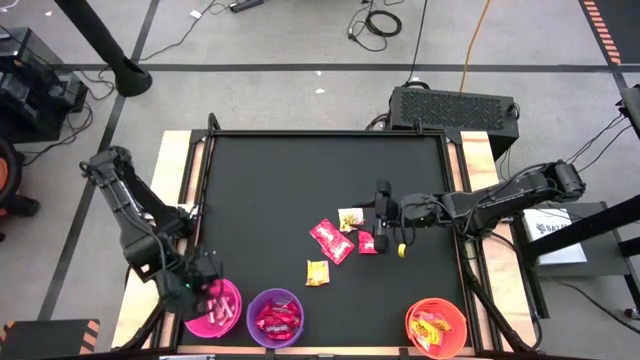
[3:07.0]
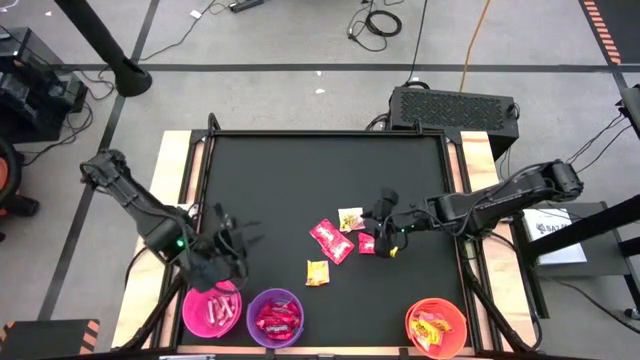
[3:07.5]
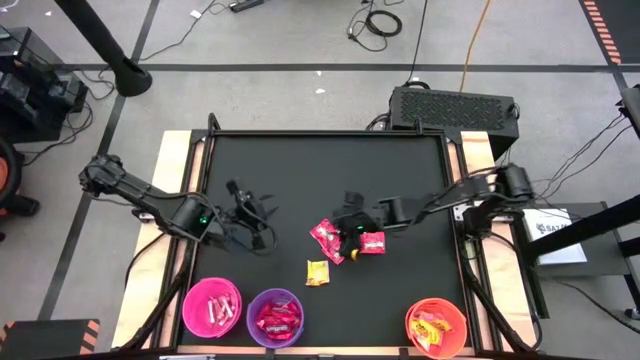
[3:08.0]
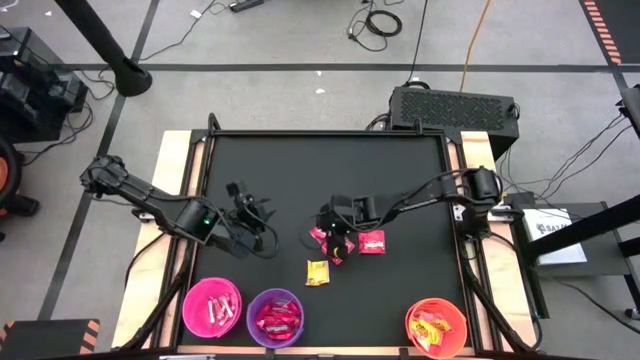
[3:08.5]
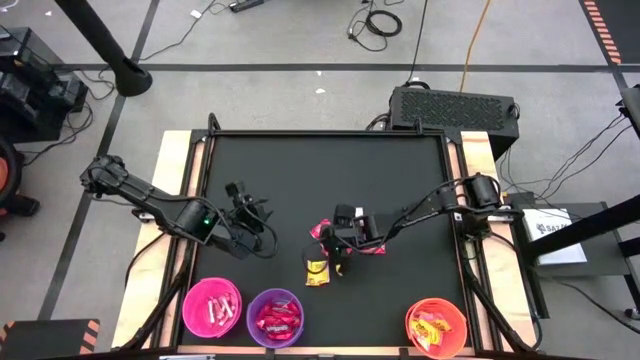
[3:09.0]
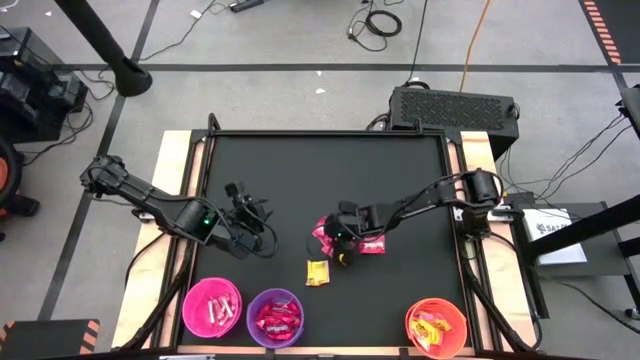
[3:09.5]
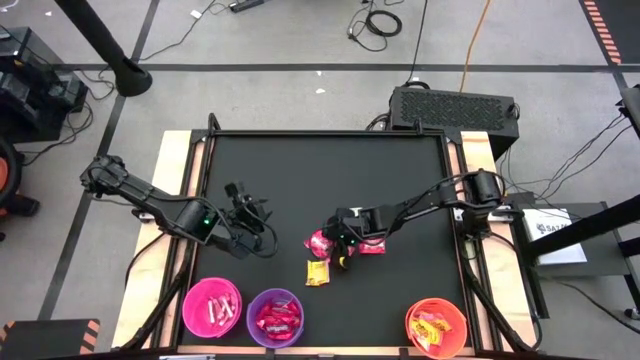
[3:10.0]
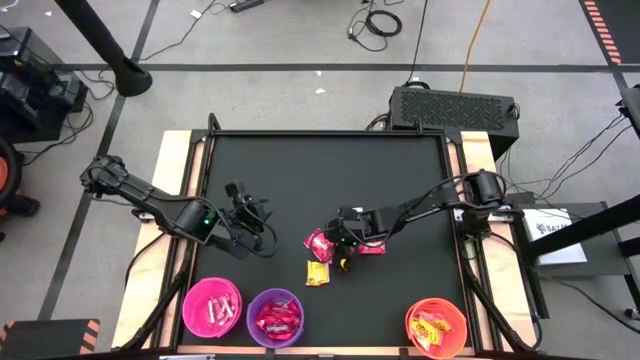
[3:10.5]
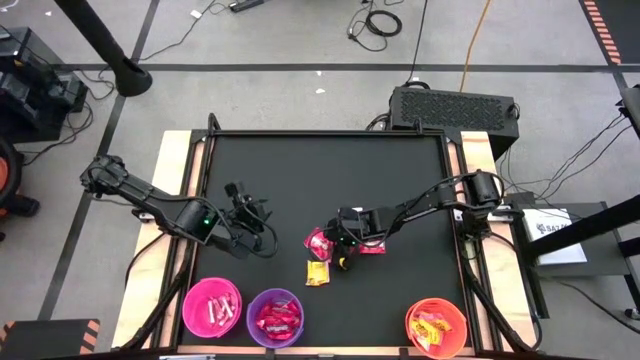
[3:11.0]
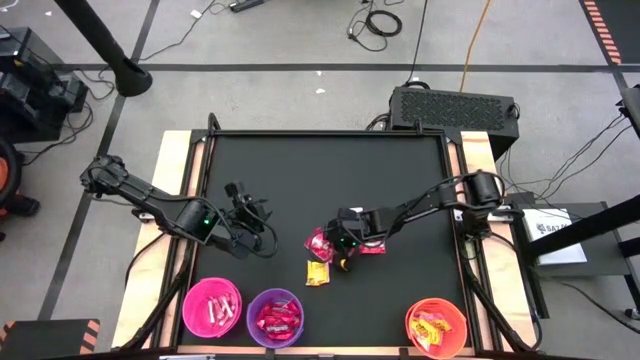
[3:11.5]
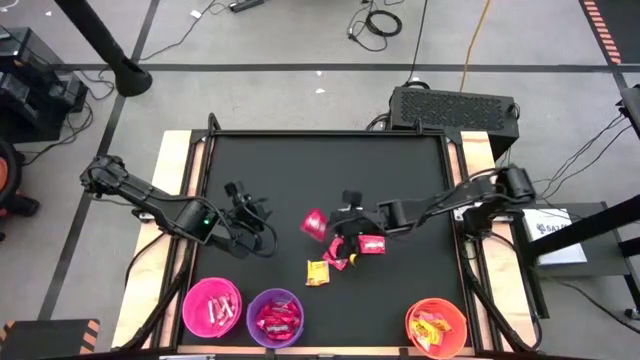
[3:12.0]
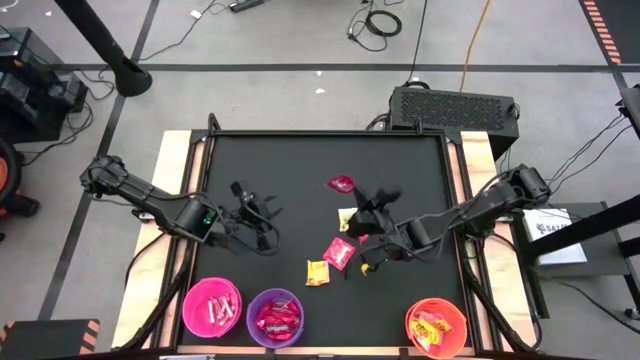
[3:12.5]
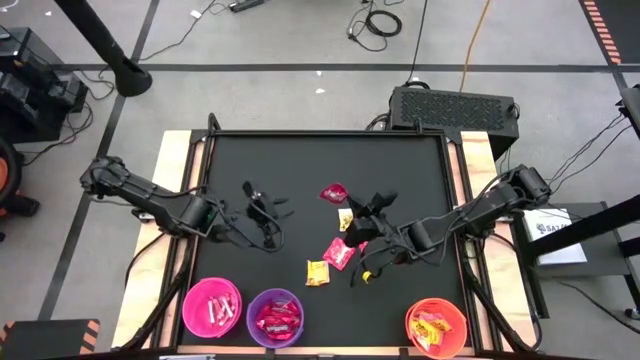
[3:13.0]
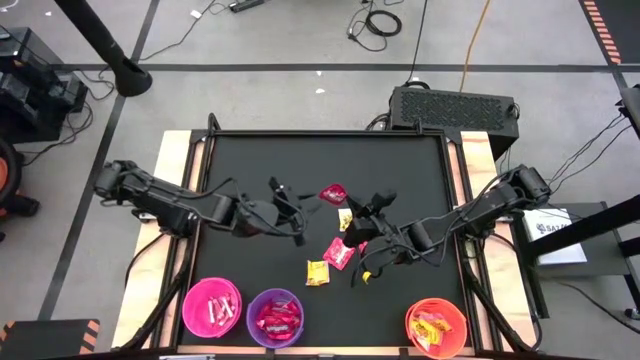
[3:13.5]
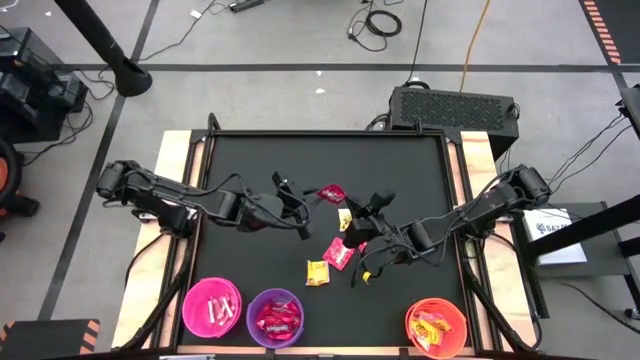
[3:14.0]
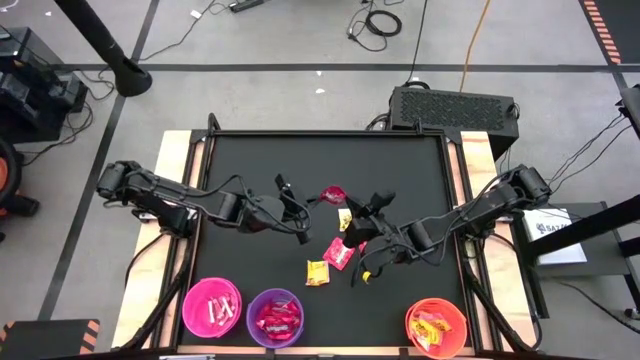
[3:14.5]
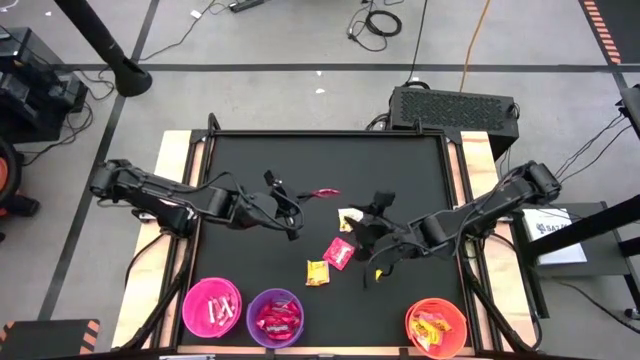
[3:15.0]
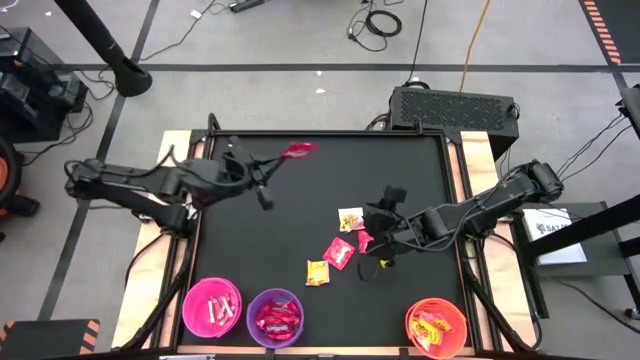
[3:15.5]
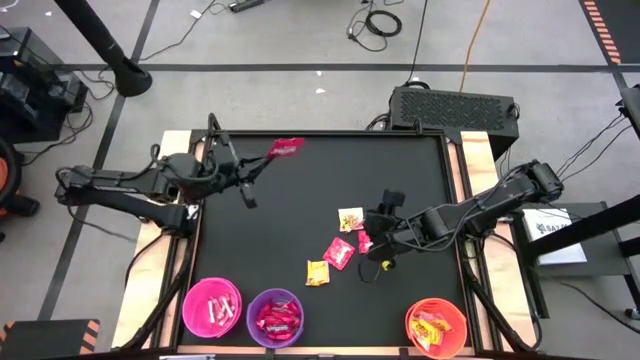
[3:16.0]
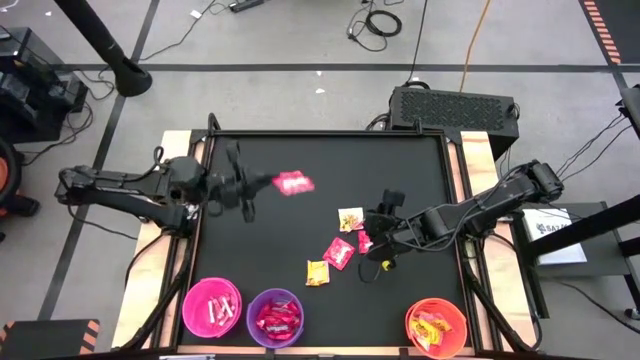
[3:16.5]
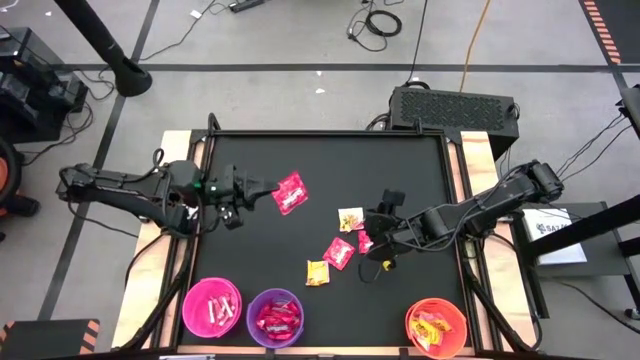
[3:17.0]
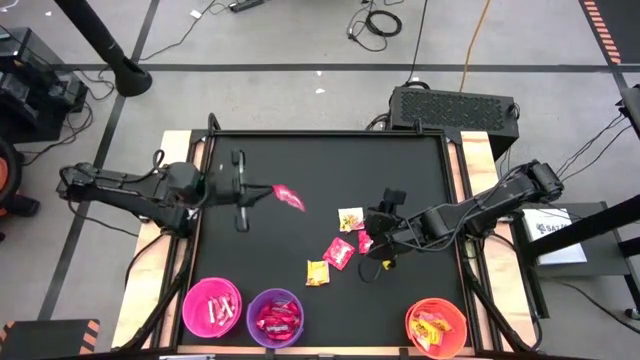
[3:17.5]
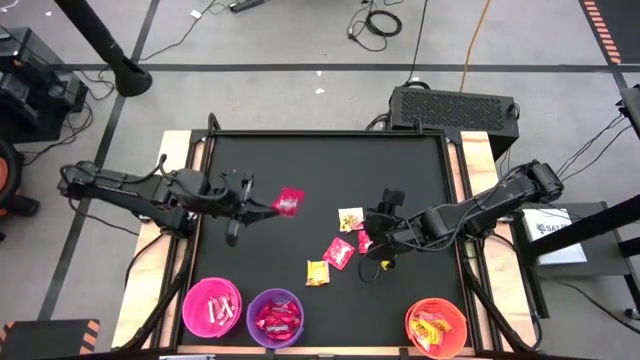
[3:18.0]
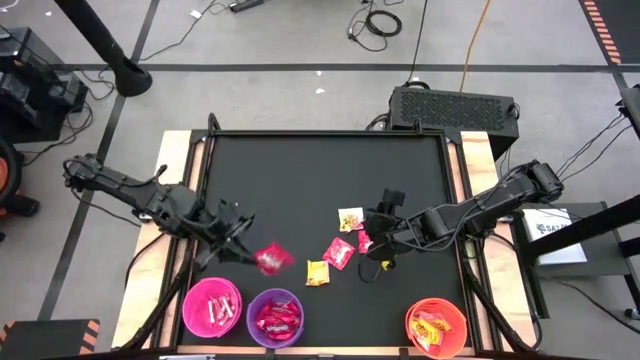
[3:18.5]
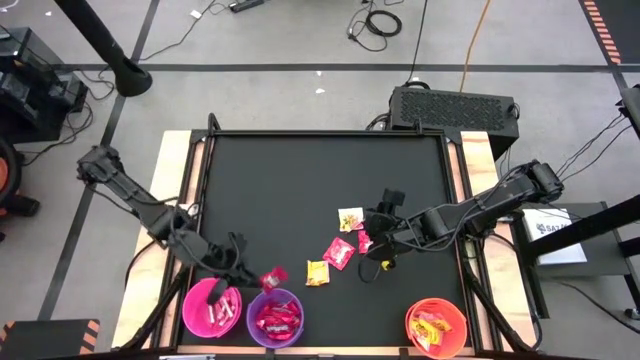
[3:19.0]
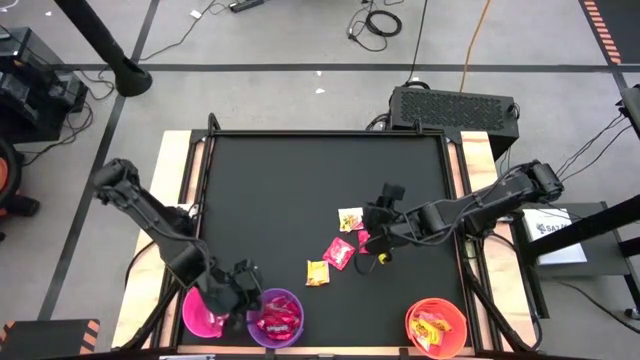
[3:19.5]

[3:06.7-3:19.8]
Task: Sort candy by brand, put in halloween buckets
Put the red candy into the violet bucket

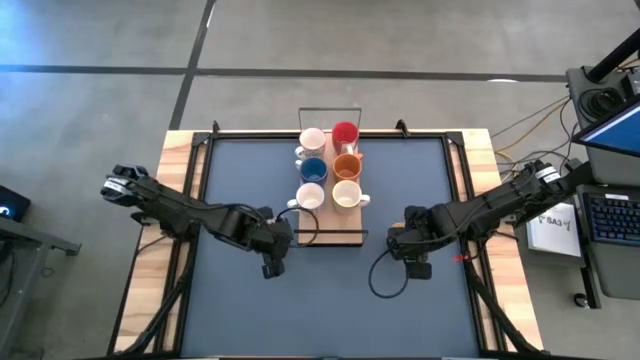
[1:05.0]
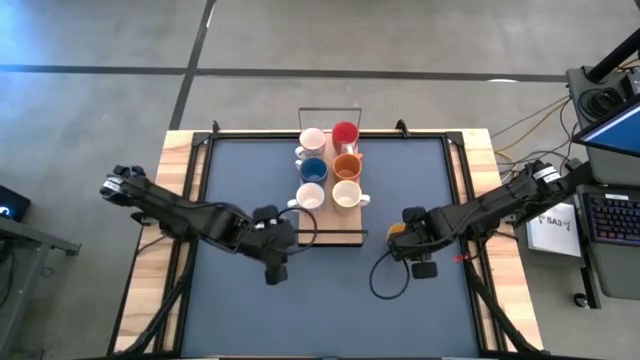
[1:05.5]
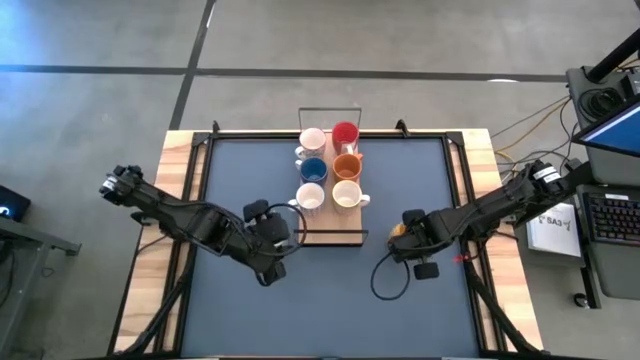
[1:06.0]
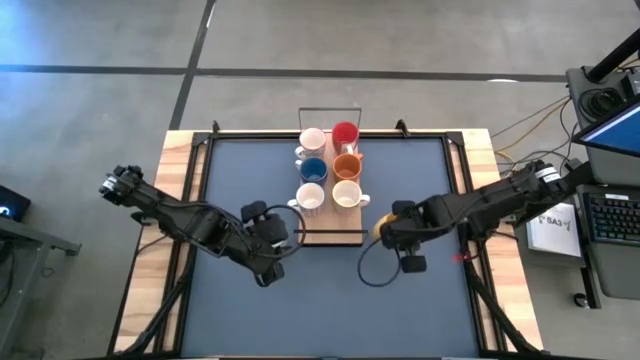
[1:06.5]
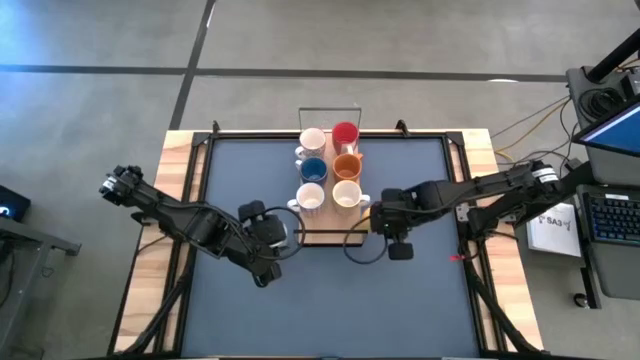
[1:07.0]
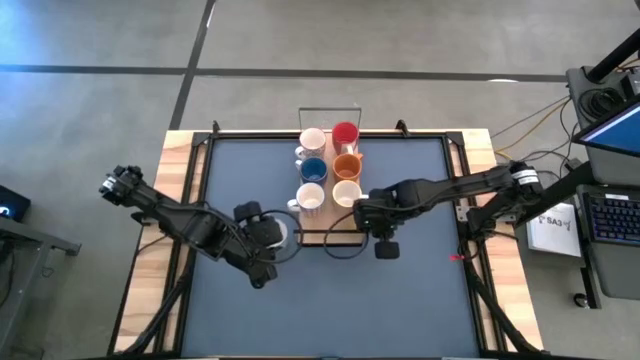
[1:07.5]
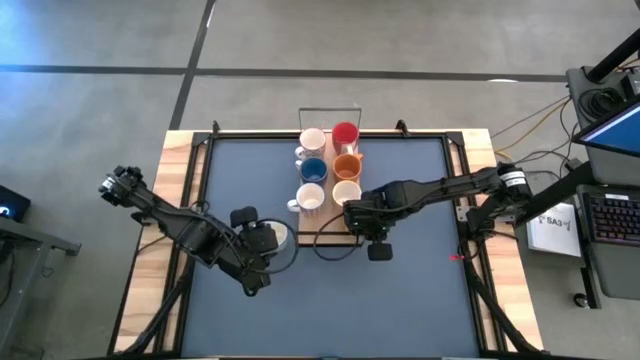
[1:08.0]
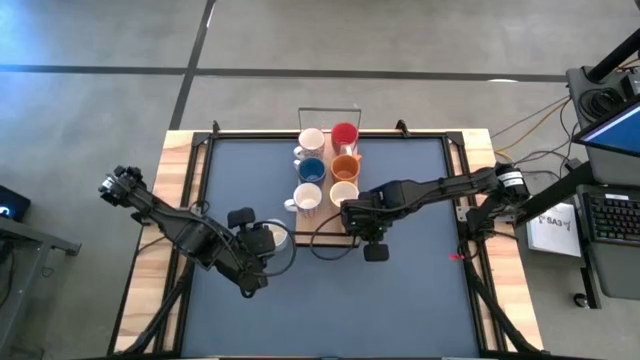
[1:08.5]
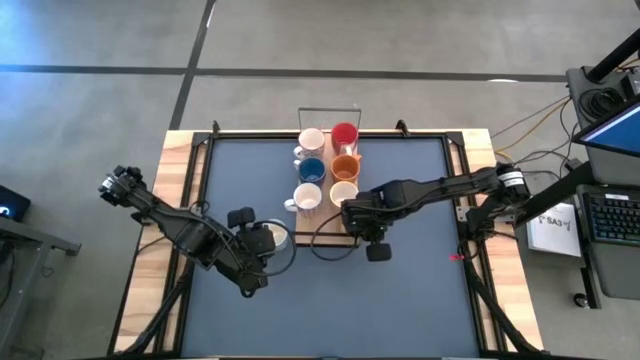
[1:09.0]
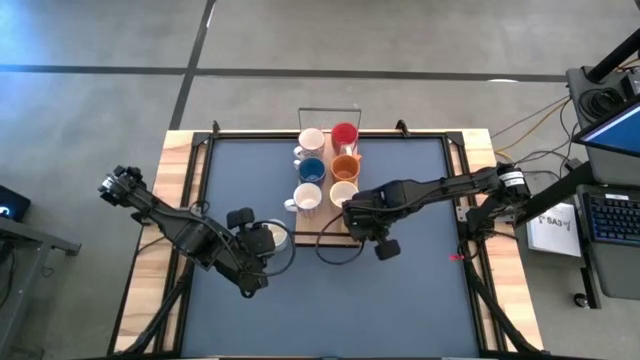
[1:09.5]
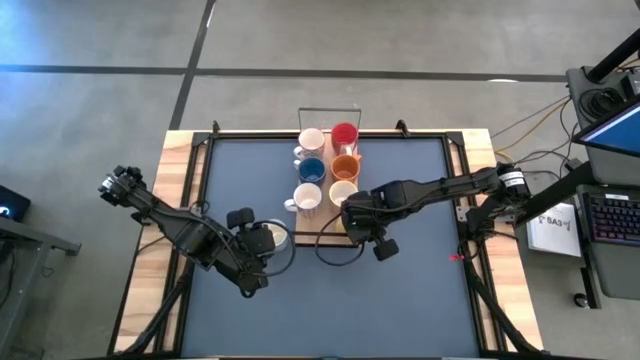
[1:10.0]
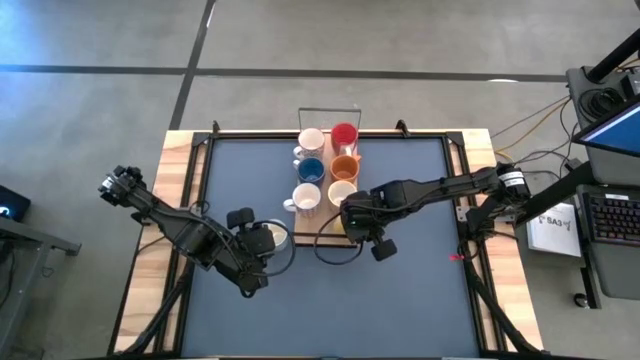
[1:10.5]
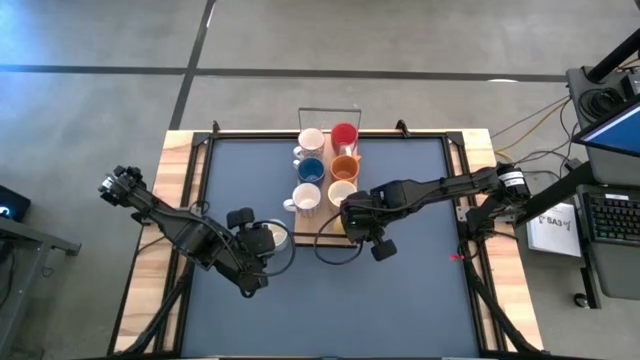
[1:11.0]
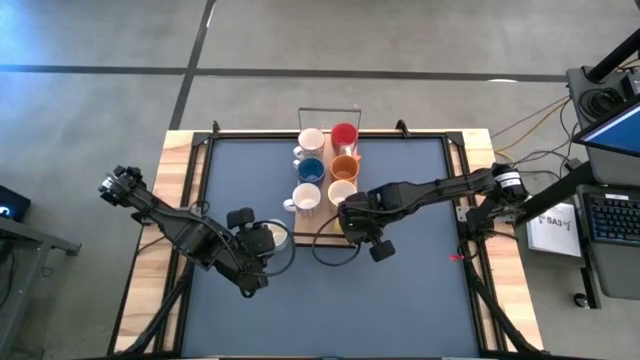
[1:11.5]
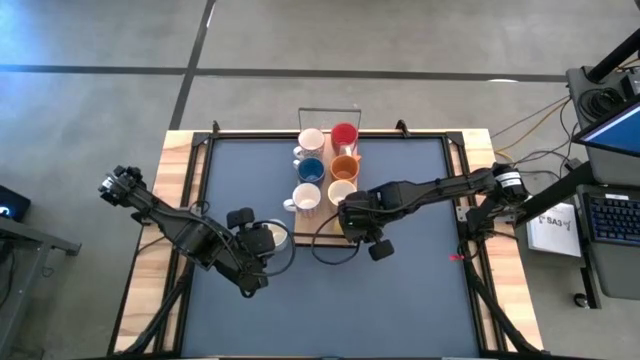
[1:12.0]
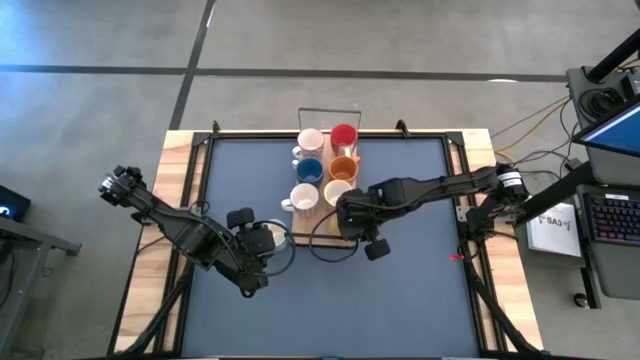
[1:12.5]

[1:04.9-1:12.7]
Task: Place coffee mugs
Put the yellow mug on the shelf
